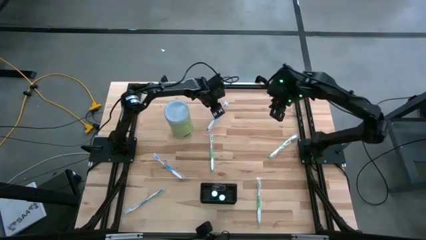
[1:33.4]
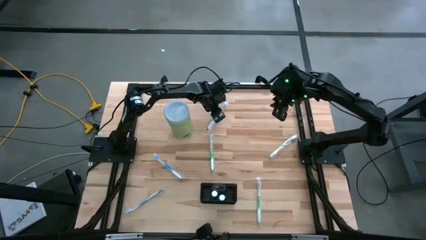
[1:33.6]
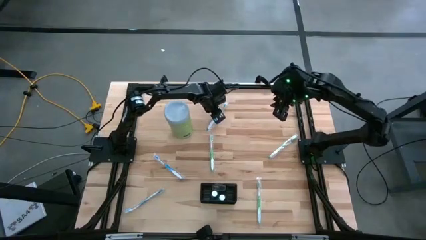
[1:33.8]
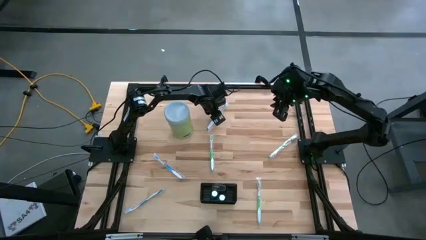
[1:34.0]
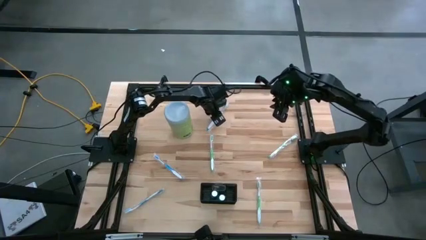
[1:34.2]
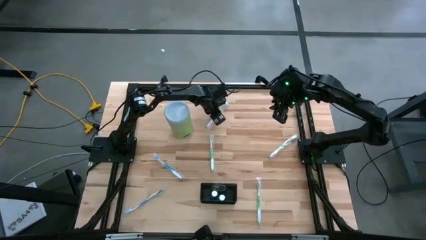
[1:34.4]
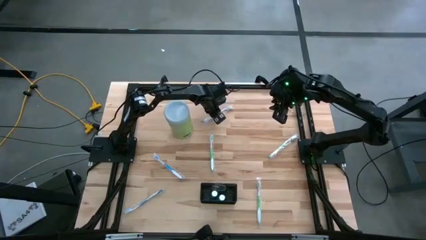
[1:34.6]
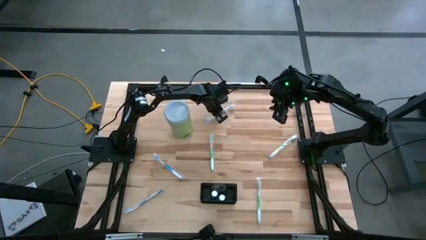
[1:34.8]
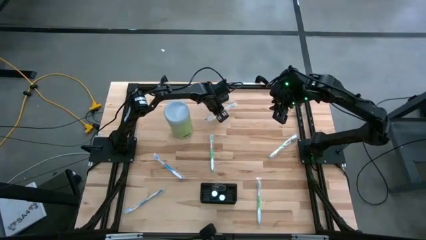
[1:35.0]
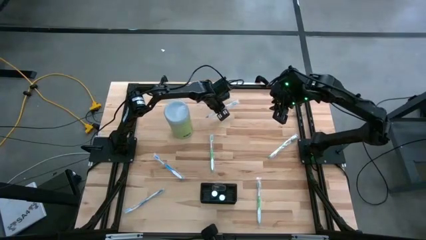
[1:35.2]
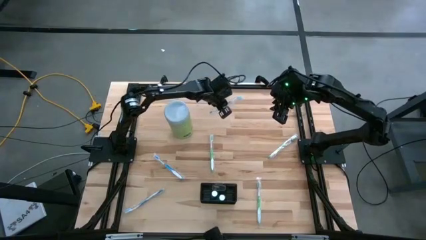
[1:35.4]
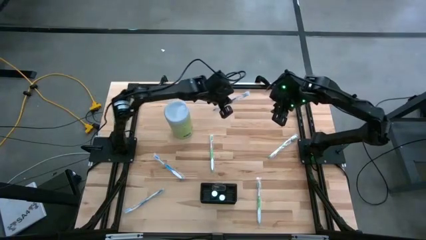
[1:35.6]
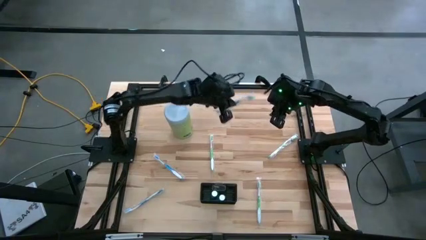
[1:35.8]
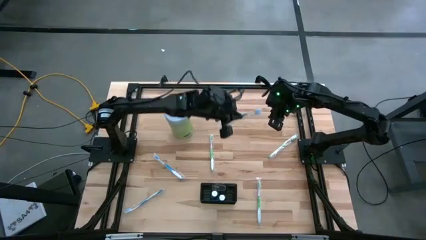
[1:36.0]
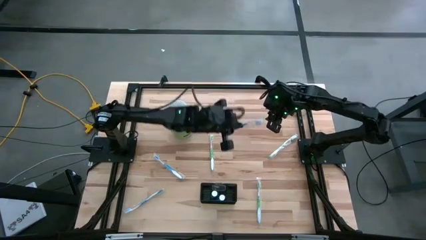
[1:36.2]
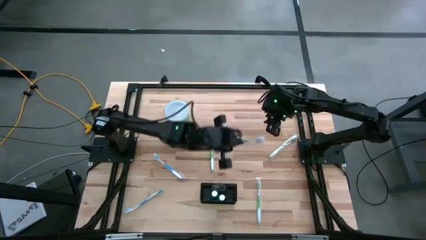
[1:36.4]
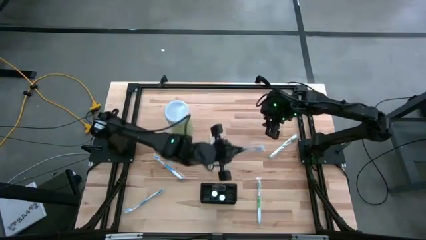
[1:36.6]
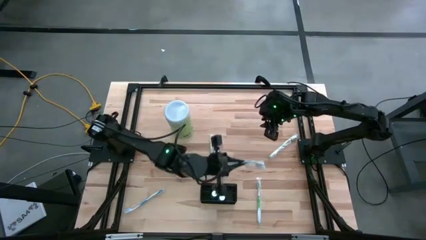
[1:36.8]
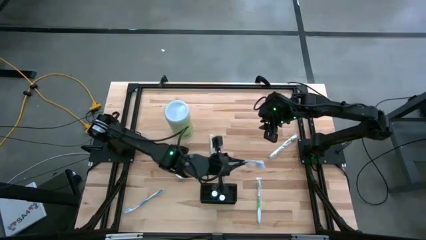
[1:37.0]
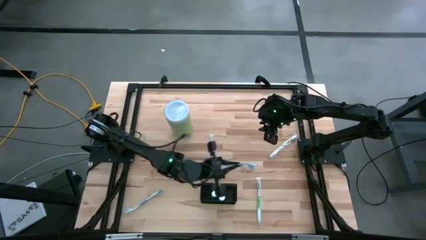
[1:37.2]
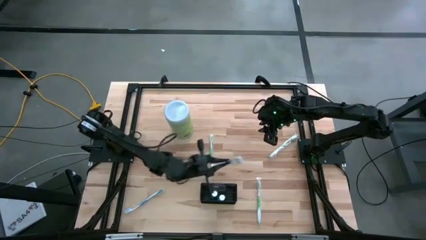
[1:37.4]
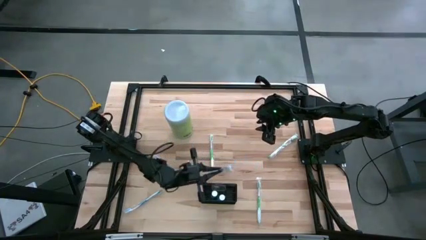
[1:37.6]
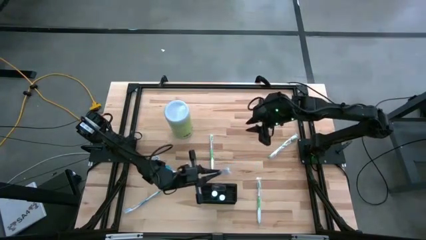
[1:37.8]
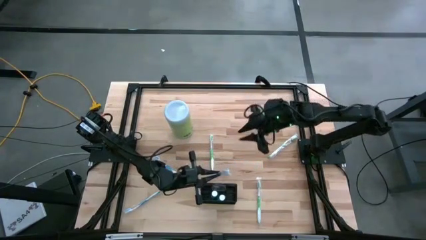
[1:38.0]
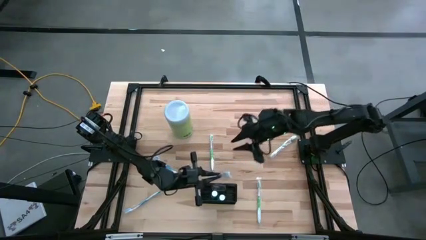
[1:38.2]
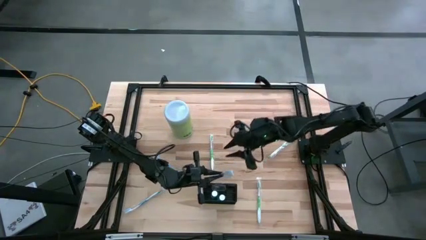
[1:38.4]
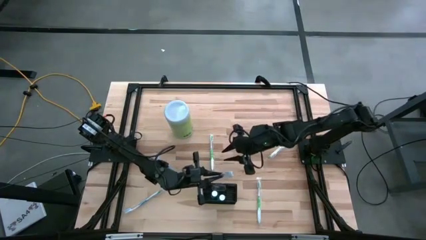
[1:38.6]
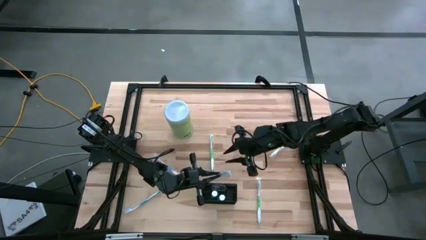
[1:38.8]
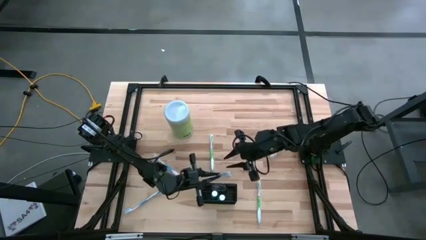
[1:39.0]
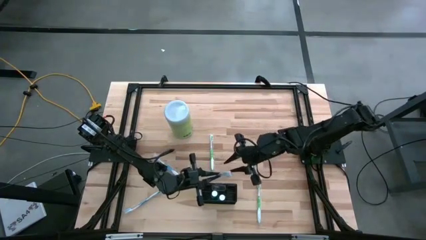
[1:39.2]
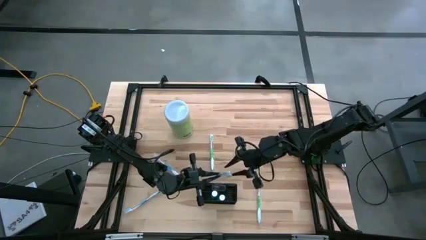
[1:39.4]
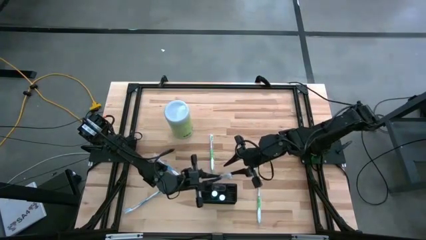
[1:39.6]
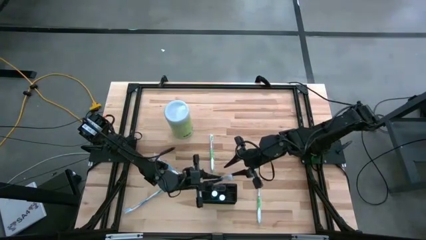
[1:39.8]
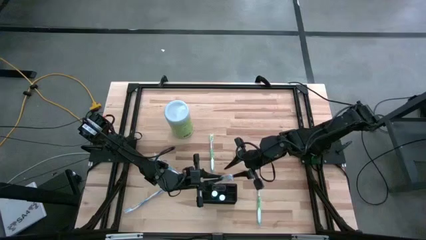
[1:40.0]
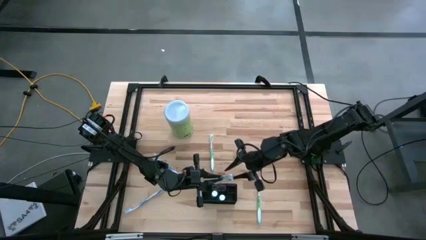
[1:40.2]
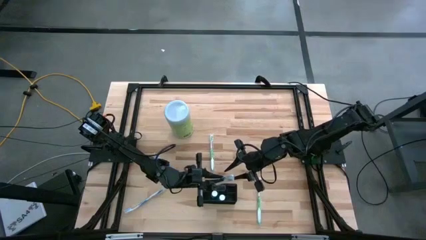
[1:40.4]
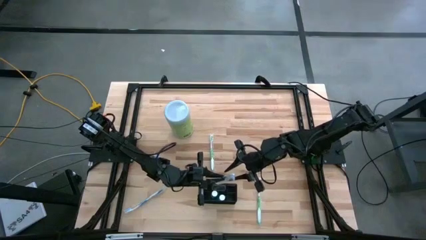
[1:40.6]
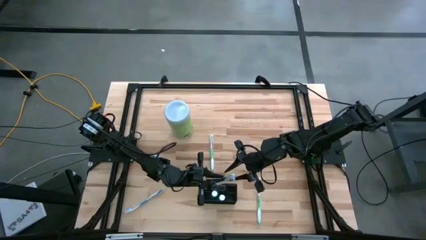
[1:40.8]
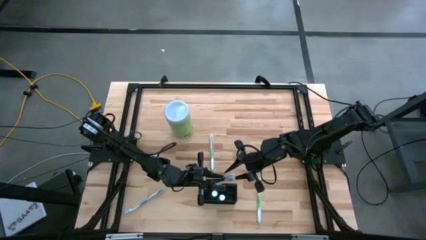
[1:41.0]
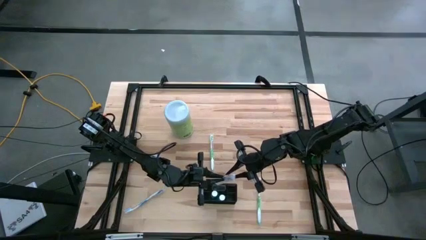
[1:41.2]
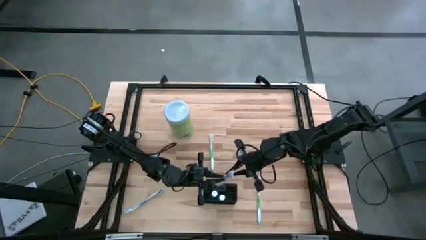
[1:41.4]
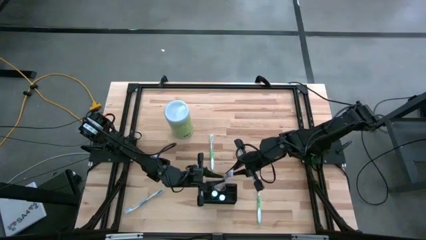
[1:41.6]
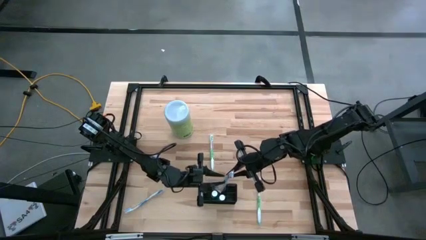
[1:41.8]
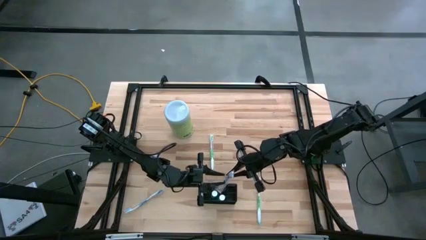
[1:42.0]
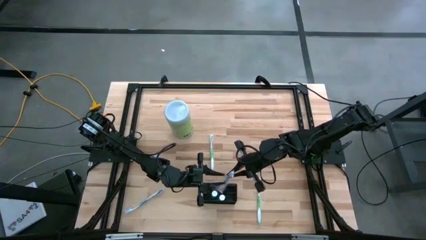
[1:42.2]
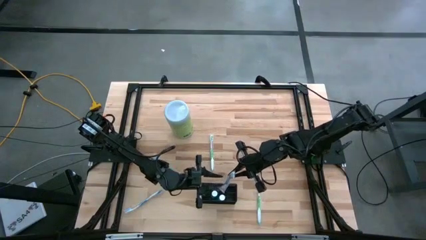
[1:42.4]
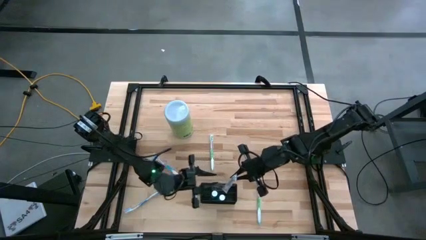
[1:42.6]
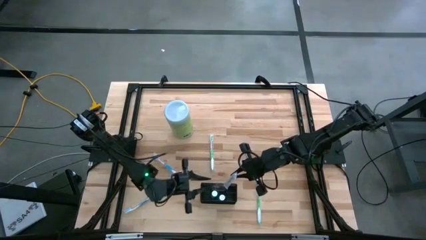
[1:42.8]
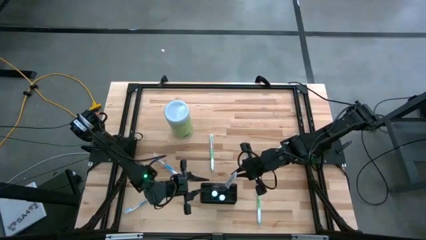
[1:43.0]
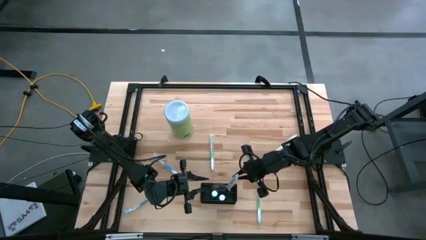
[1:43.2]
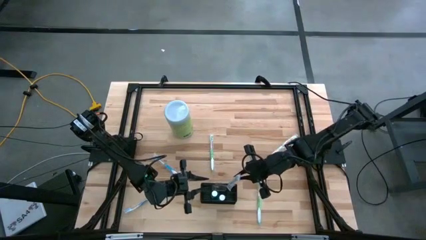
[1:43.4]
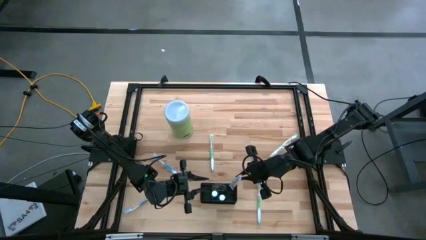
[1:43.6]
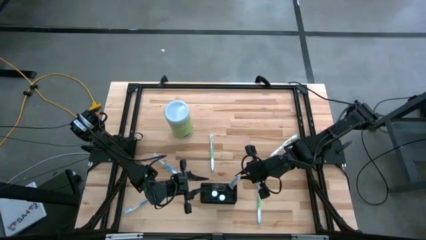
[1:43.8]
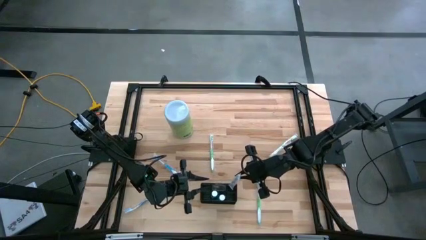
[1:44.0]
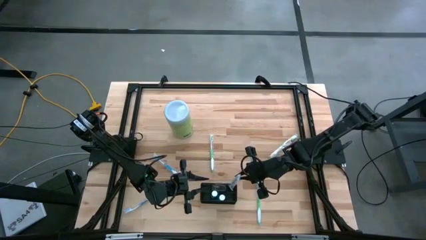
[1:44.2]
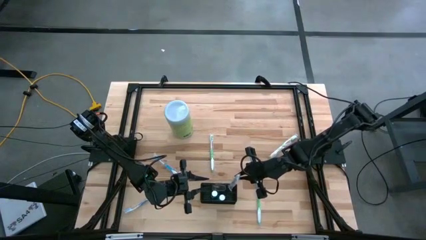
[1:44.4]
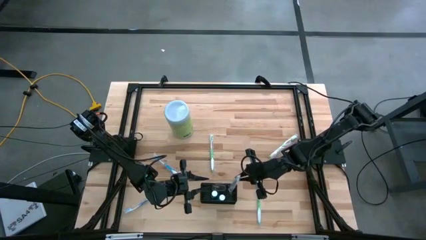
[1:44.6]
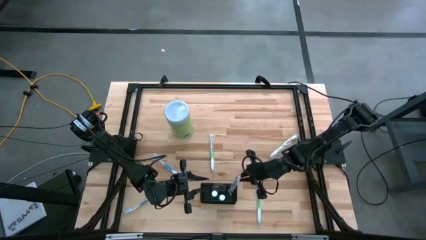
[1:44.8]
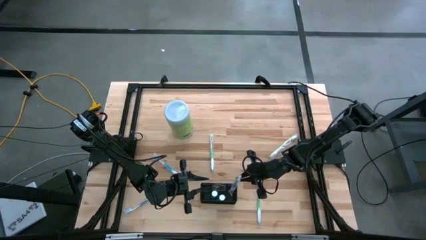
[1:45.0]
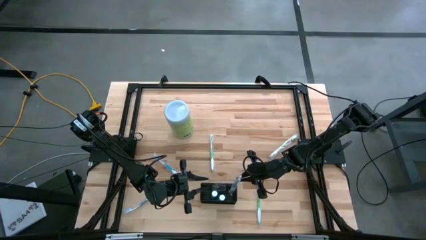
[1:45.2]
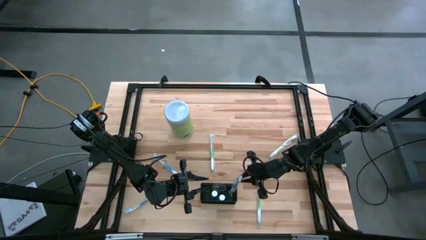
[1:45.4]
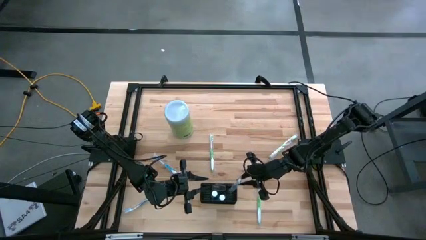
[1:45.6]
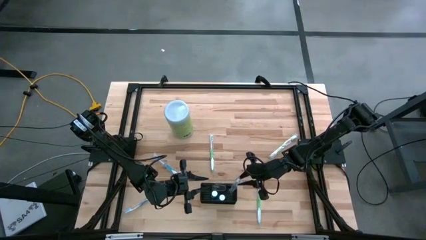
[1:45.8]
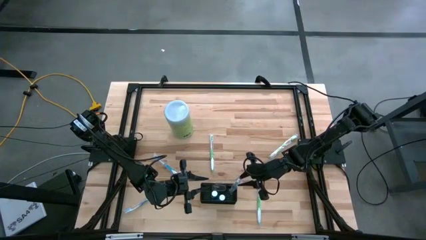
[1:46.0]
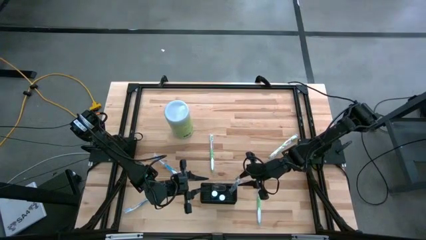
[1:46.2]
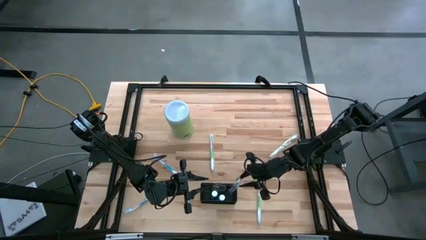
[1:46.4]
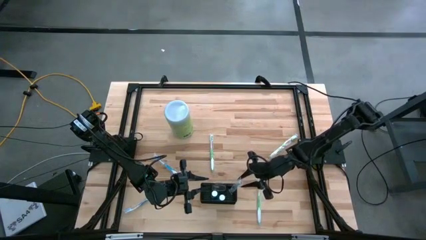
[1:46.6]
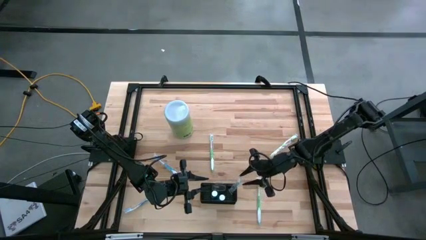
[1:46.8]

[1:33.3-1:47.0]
Task: Pick & Place toothbrushing station
Put the top blue toothbrush into the mesh organizer
